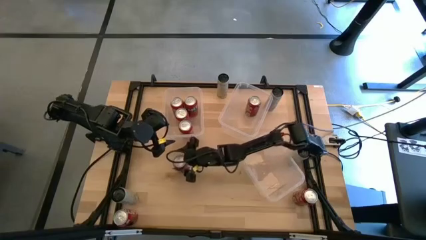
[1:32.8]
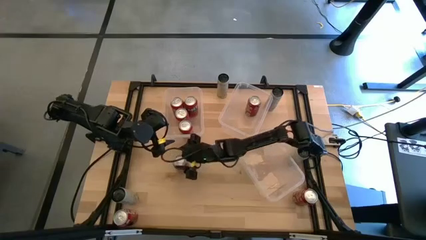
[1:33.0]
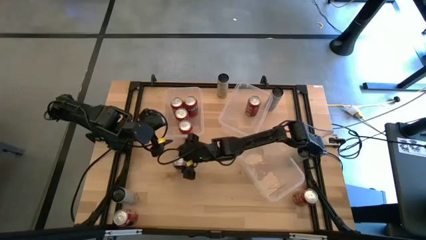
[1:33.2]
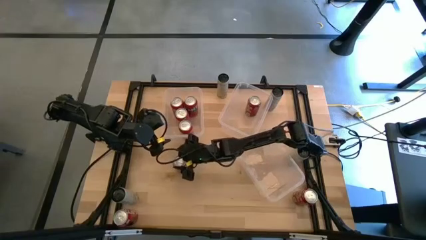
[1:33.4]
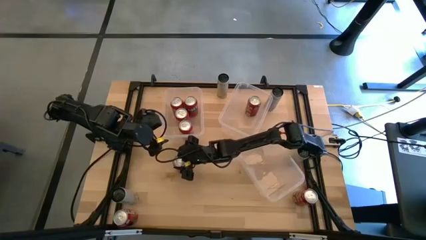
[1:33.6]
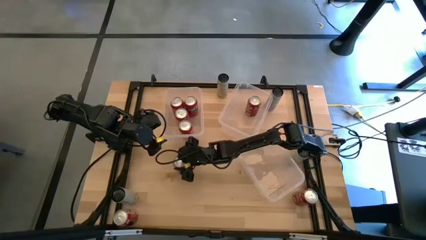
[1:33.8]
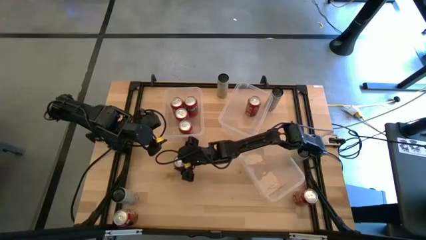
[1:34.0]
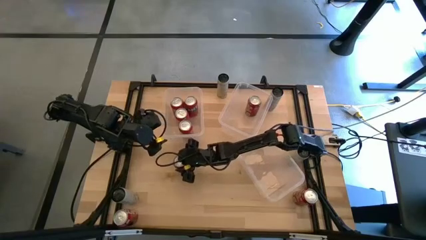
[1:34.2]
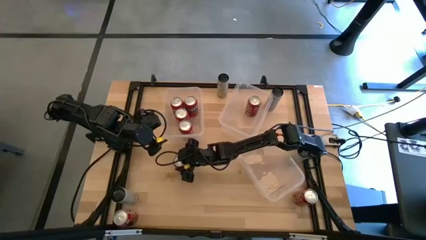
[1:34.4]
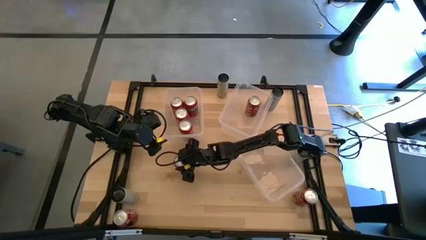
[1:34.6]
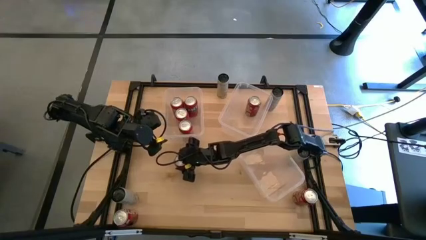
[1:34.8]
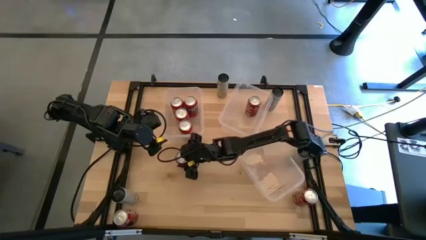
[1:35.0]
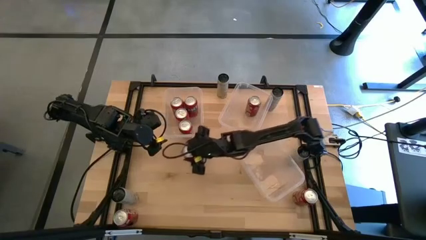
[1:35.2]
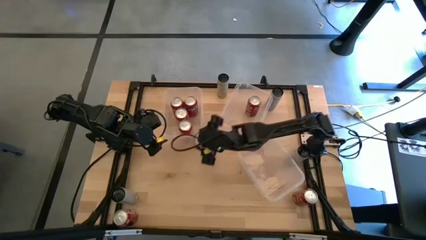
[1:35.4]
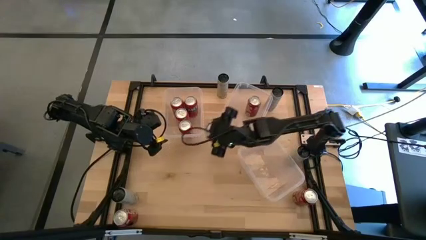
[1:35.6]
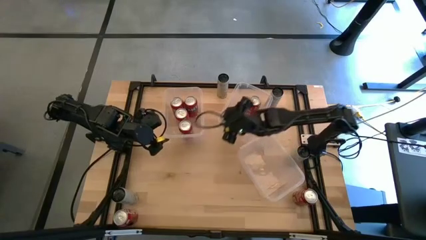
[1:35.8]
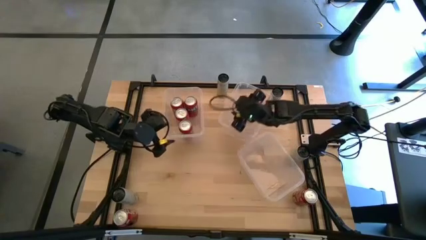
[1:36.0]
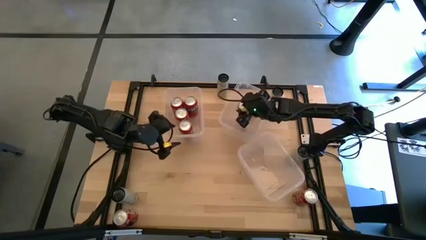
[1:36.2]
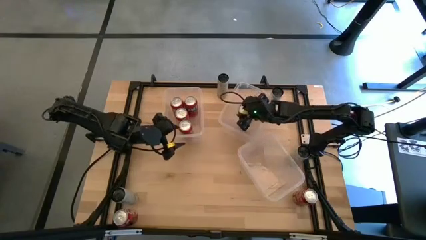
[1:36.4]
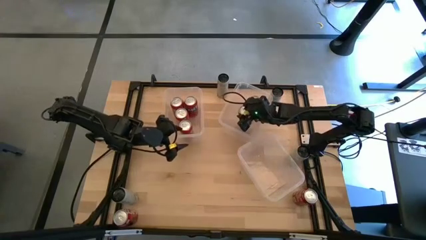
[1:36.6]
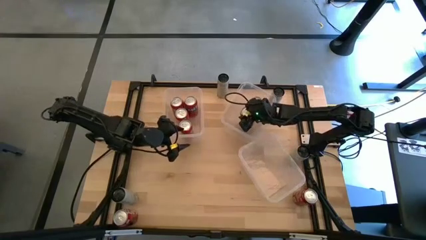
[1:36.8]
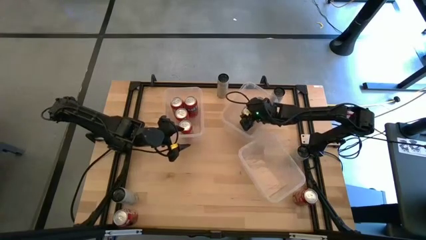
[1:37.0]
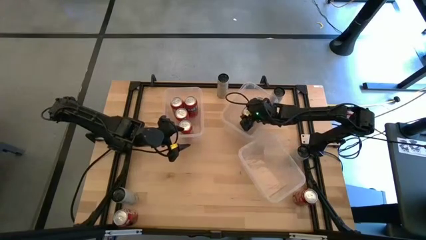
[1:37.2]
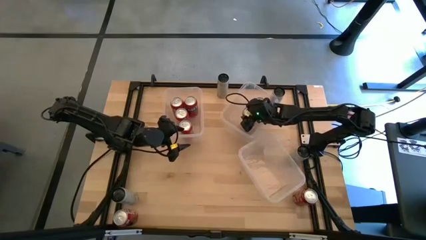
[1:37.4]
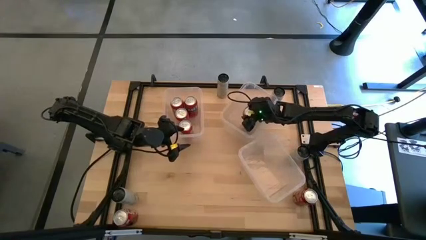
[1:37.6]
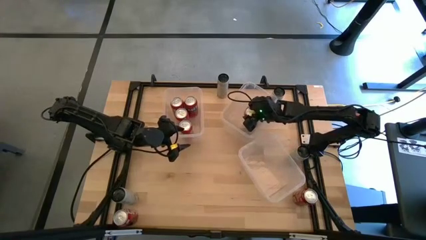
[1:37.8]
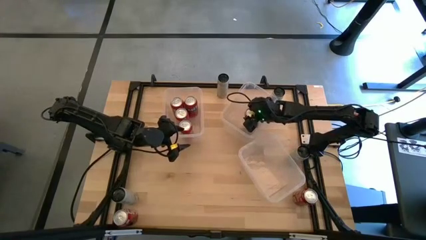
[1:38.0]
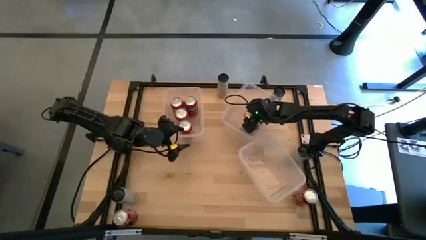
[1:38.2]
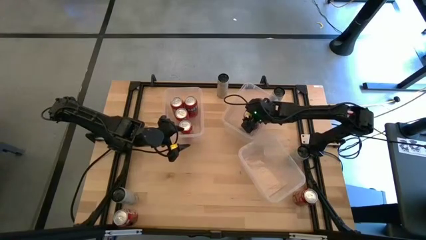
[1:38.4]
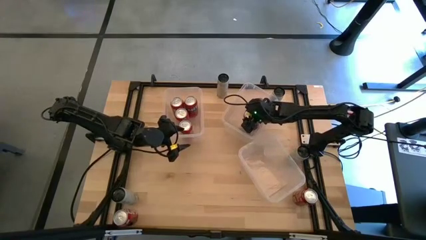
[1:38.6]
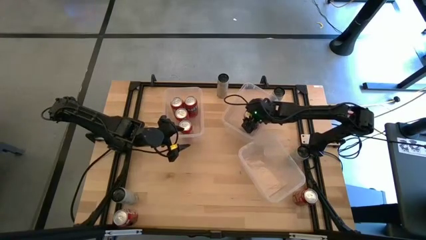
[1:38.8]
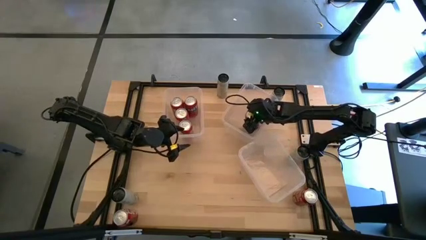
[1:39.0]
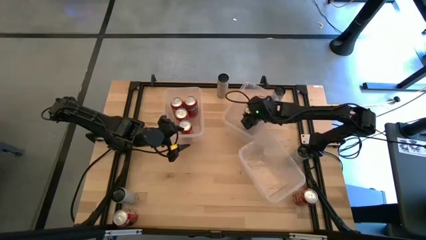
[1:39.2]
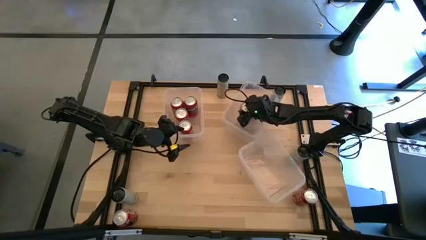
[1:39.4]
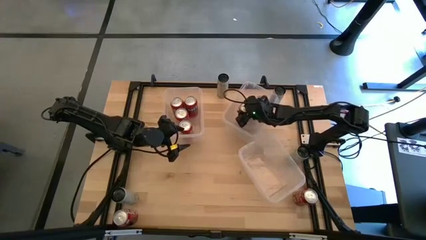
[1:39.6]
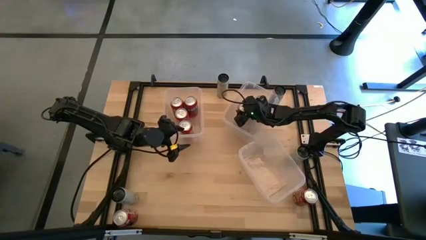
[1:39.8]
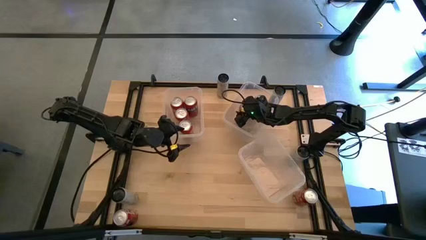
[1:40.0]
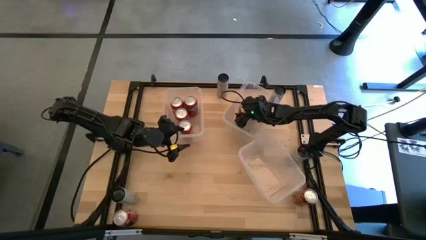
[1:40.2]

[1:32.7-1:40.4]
Task: Sort soda cans
Put the red-white soda can into the top right transparent bin

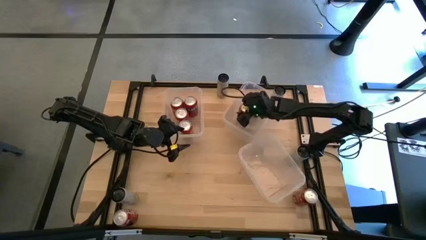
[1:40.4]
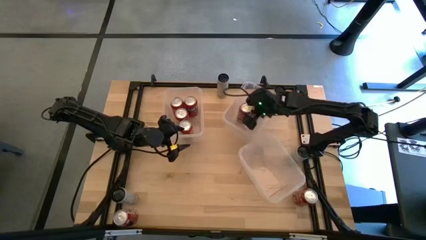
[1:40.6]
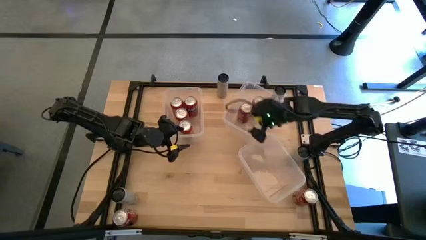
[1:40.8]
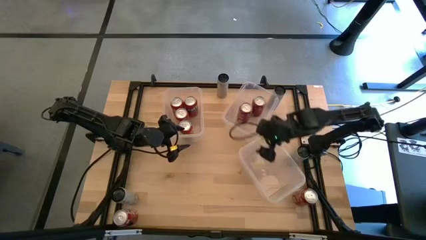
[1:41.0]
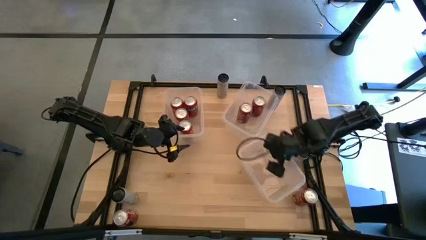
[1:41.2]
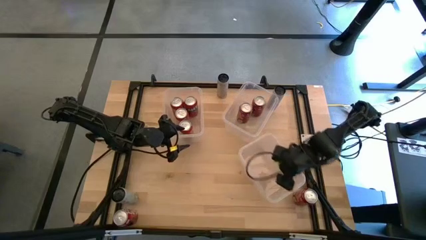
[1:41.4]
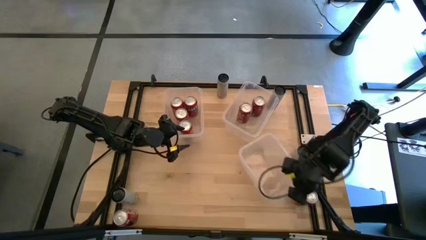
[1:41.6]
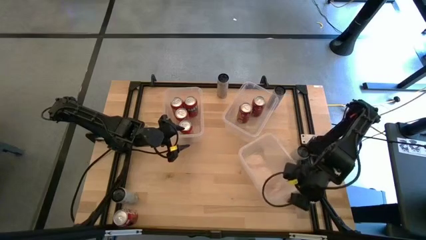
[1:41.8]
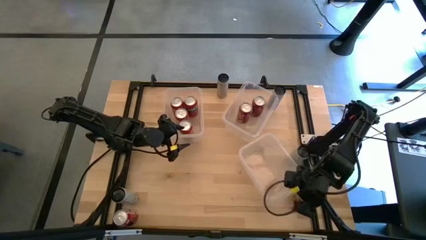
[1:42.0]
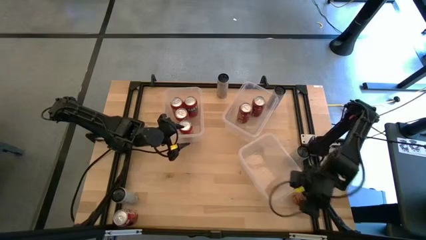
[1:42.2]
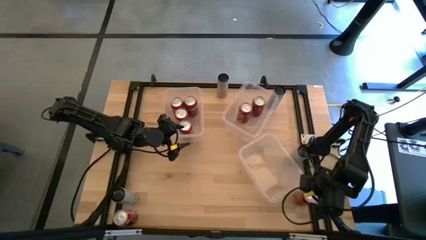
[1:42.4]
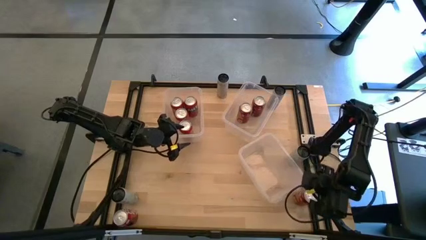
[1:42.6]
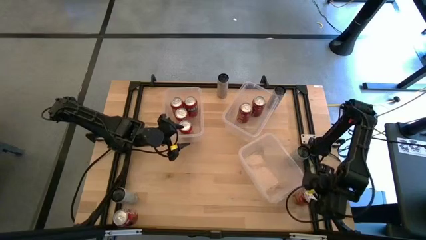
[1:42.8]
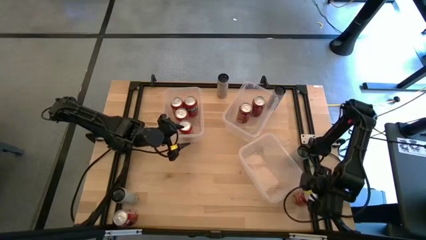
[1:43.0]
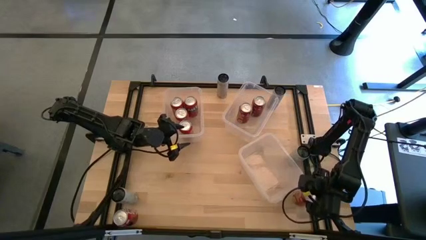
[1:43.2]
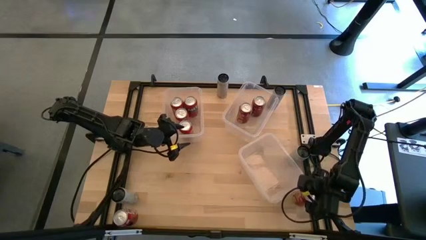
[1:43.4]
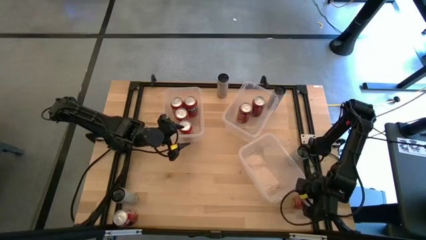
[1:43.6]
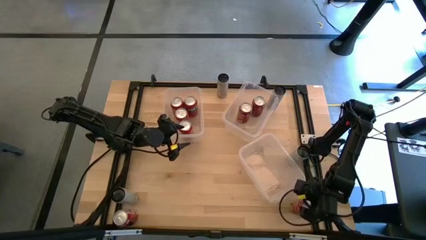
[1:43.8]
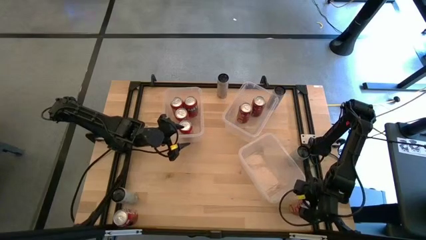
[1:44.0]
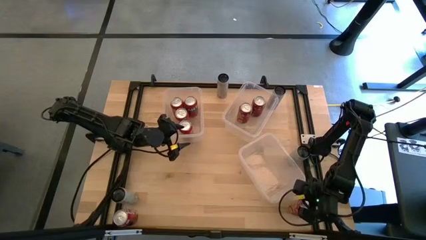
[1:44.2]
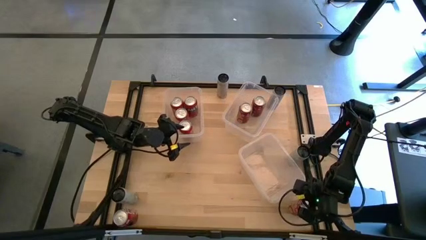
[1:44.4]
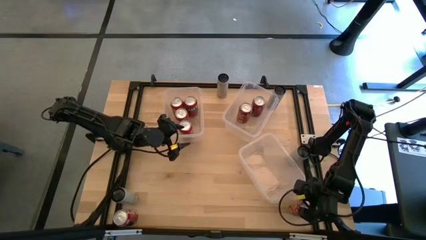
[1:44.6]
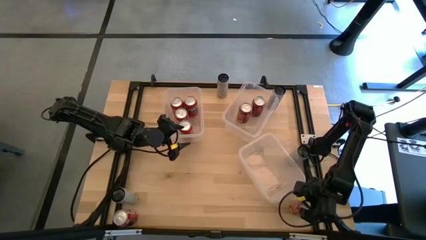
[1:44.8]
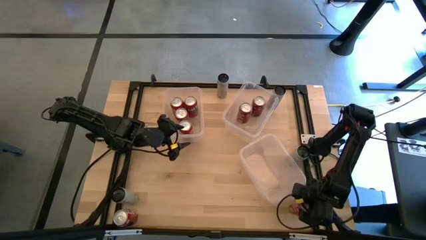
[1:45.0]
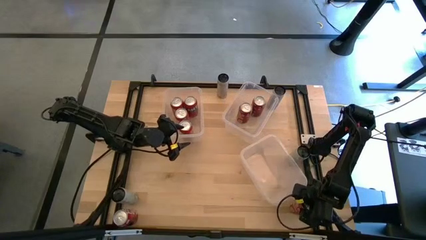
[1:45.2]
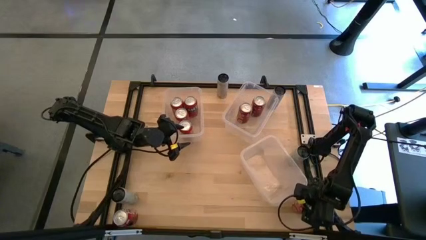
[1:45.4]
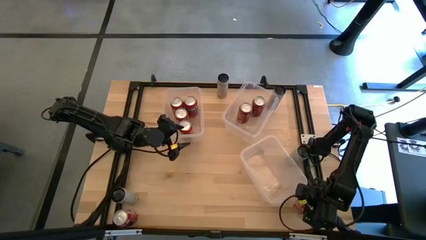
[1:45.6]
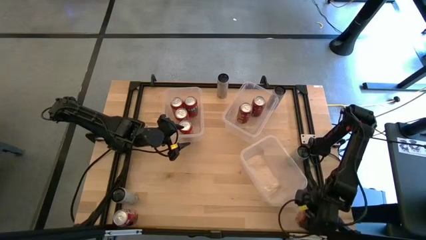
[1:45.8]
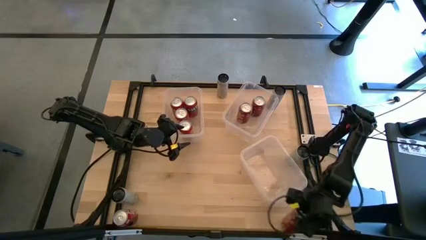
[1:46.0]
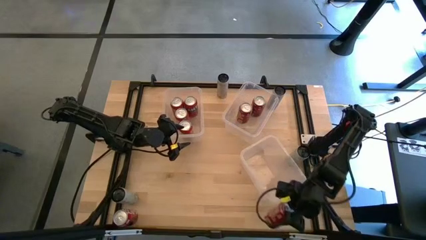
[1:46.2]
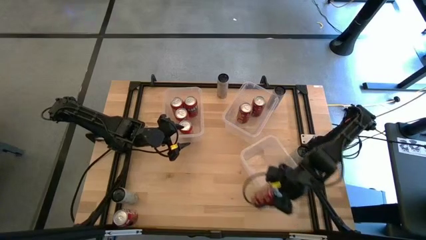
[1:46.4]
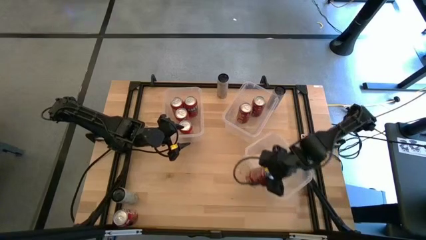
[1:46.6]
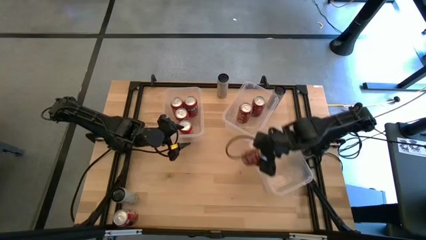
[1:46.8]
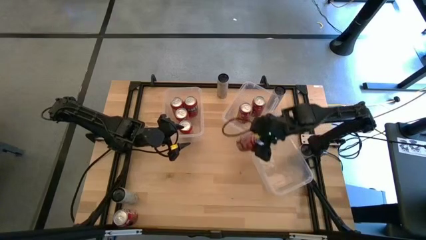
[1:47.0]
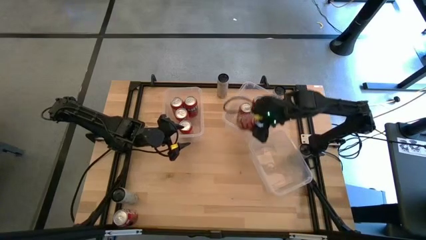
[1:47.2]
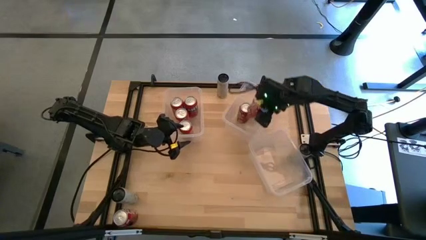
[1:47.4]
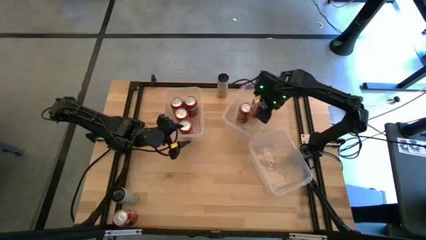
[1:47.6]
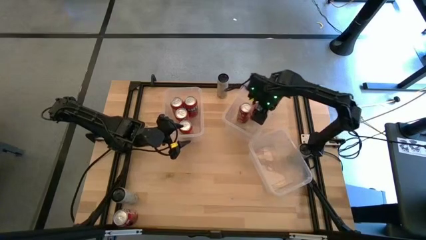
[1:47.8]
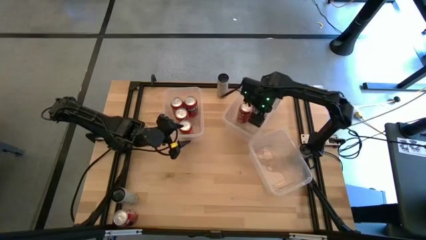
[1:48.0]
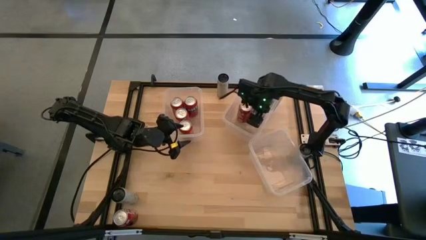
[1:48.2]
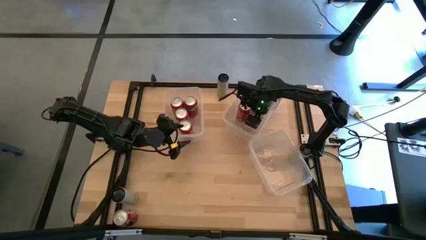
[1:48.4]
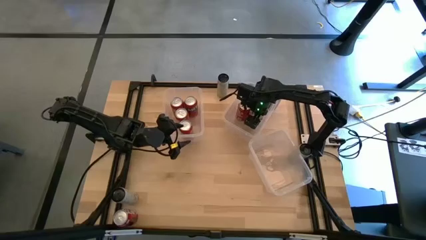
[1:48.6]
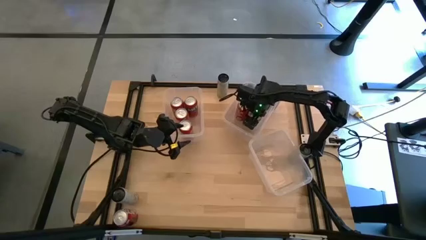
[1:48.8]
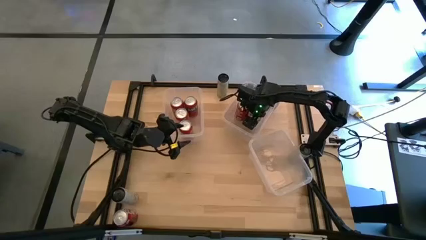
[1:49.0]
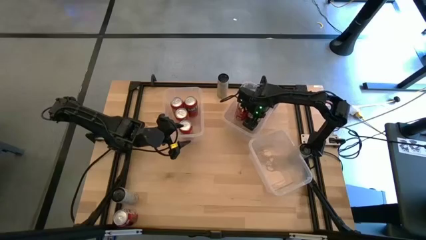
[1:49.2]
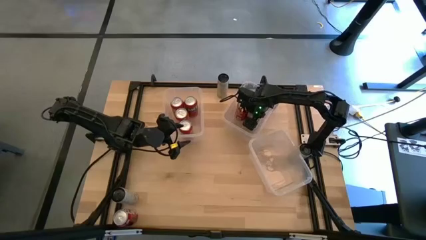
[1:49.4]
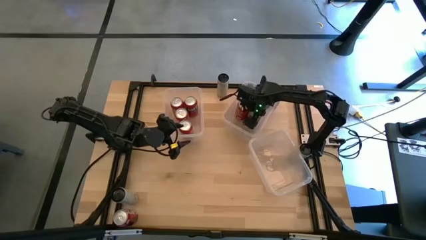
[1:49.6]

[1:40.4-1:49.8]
Put the red-white soda can into the top right transparent bin
